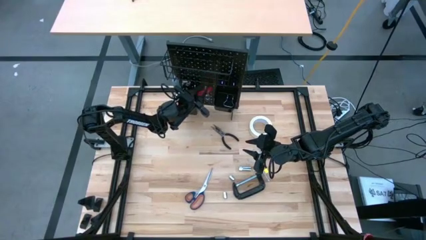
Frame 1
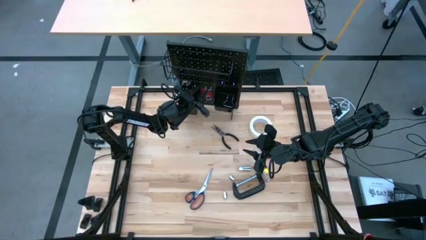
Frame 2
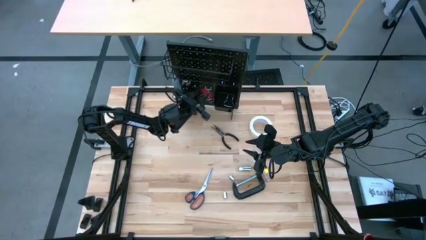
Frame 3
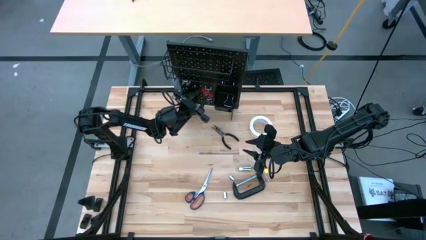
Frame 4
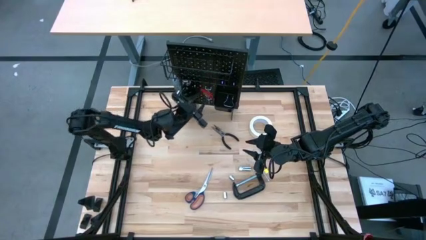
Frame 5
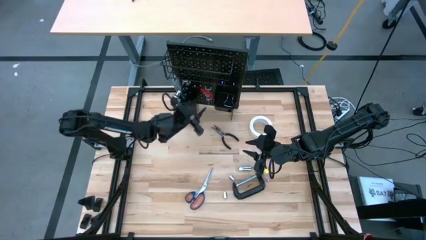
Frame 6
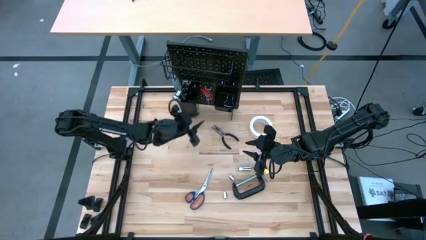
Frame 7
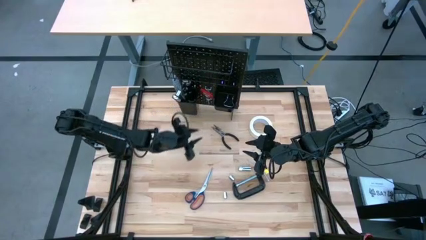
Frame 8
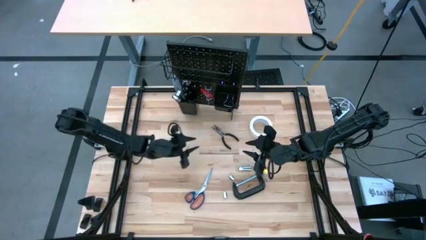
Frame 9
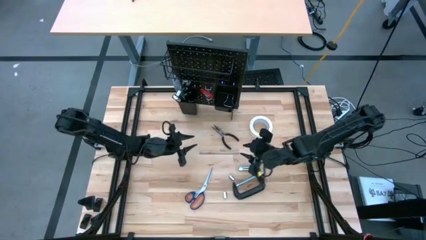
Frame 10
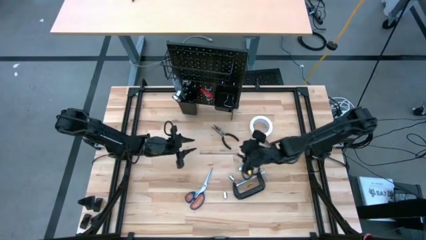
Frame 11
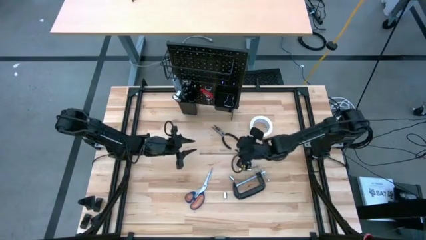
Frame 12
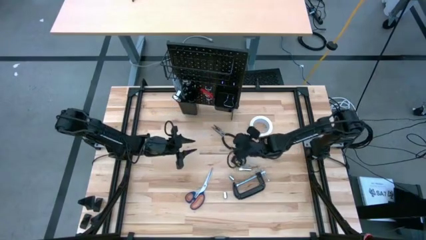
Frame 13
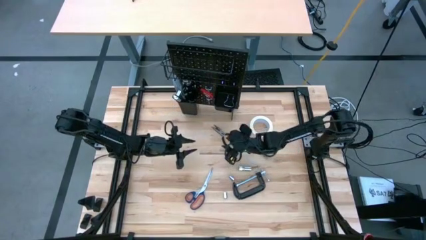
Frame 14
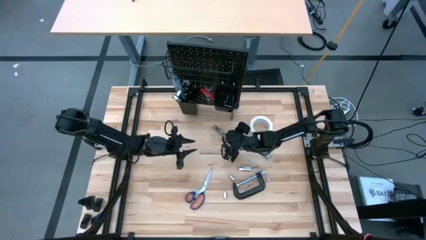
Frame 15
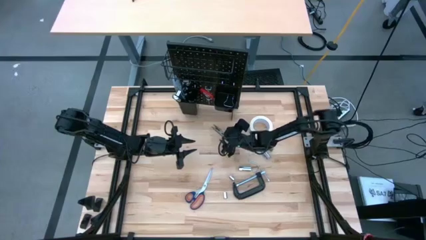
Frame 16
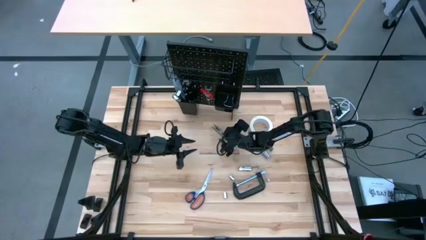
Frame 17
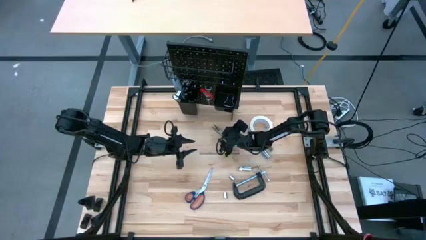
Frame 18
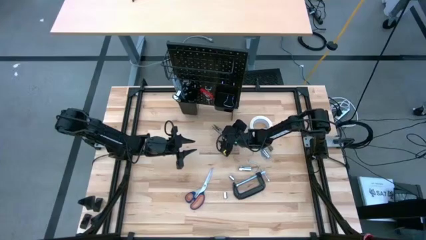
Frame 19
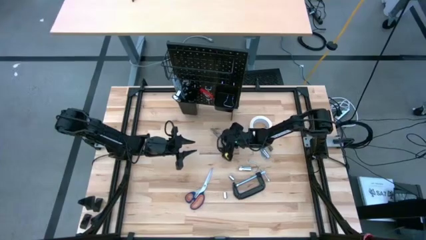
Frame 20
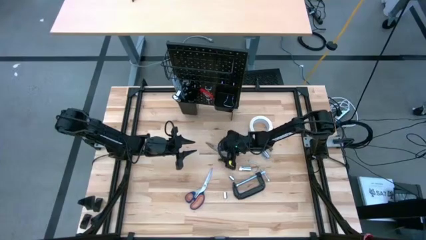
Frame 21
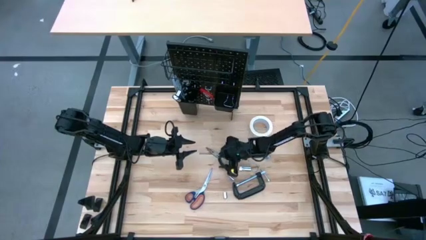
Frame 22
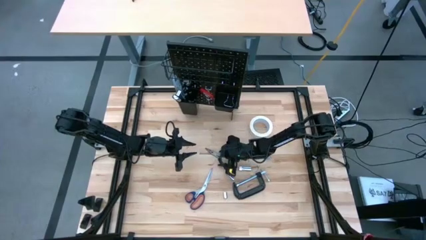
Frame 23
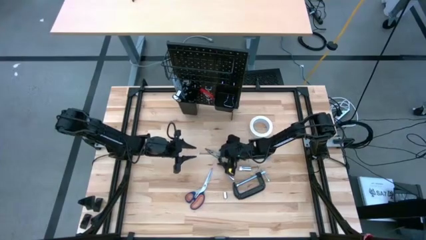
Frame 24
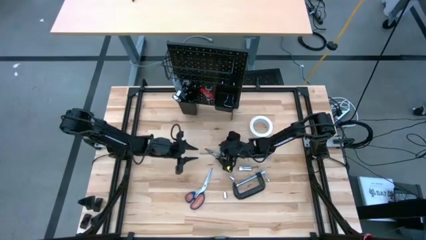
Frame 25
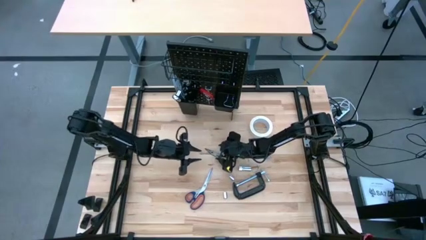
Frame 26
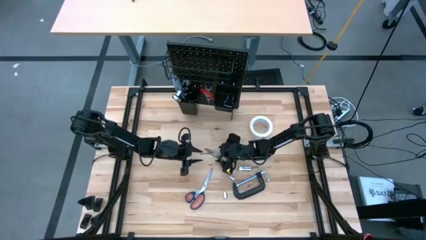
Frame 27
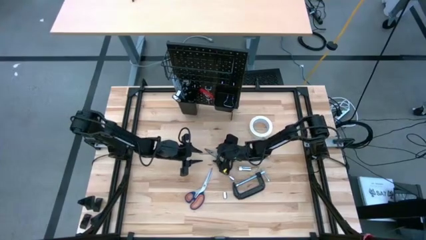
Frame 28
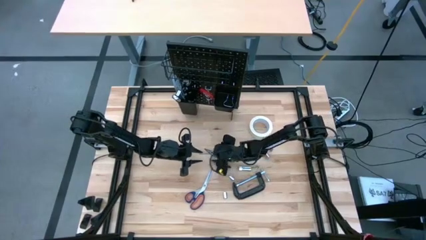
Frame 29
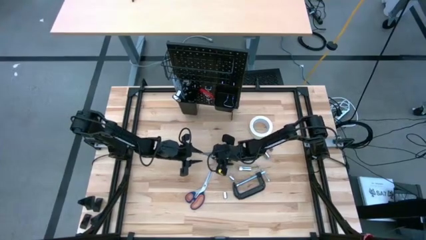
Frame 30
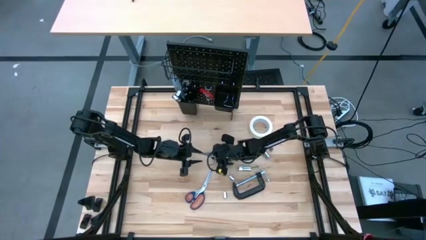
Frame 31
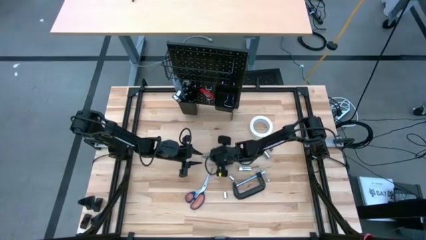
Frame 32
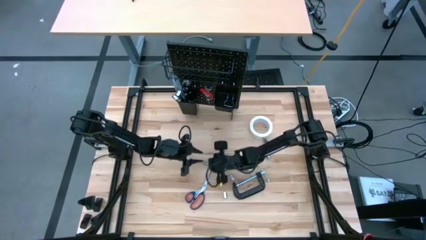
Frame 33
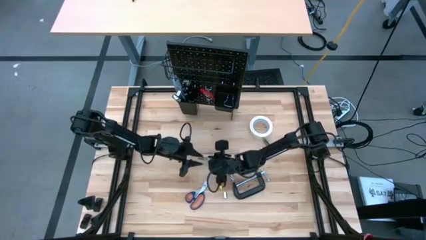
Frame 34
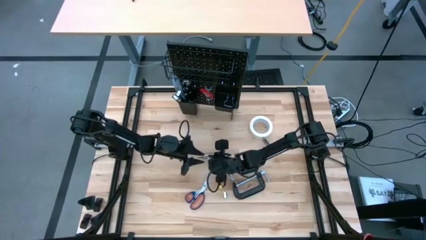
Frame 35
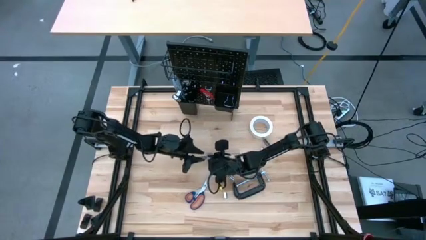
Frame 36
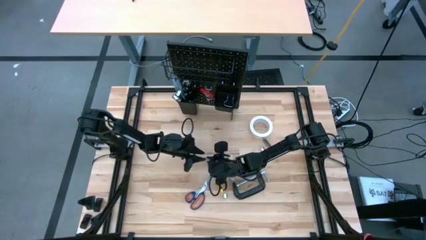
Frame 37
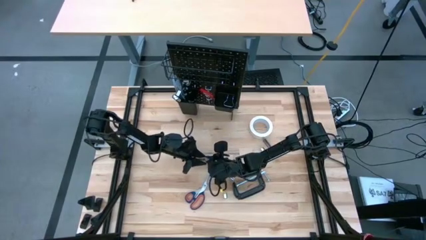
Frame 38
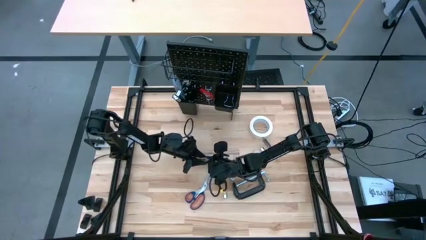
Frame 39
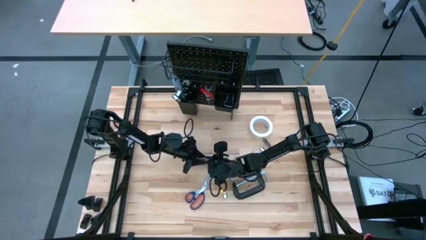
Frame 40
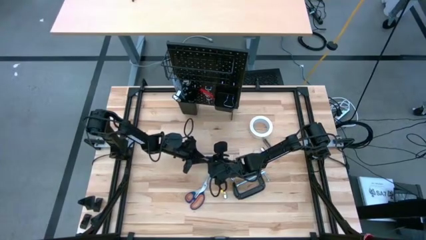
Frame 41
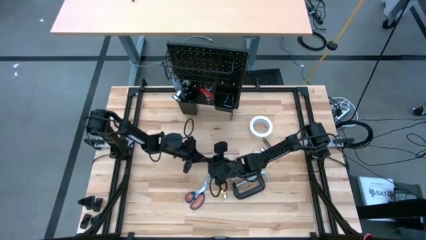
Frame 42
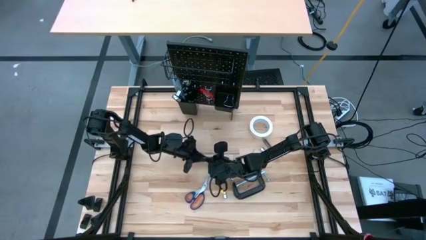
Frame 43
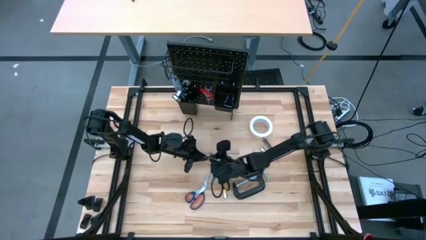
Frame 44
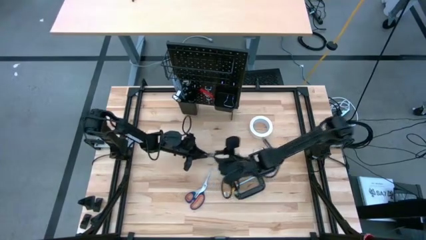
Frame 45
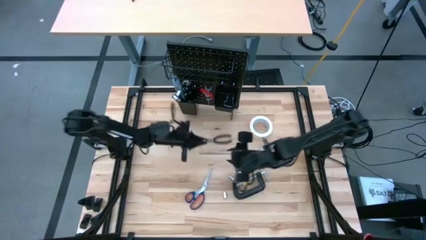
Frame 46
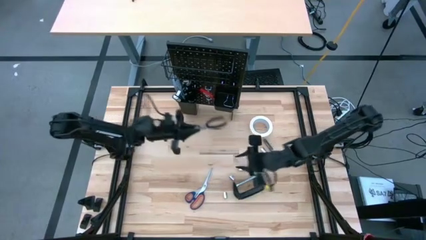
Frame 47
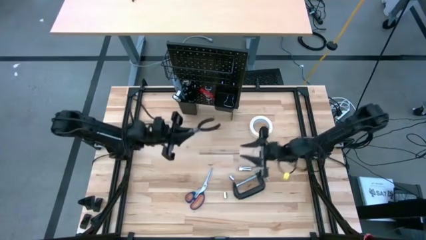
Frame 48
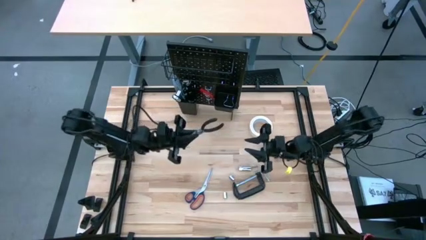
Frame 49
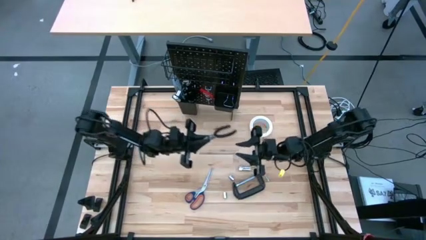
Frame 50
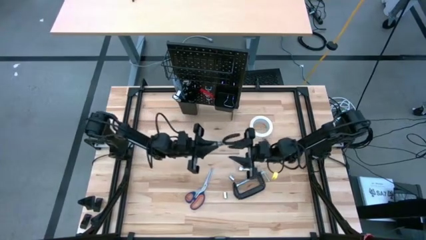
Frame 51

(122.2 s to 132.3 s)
Task: Hang tools onto peg board
Put the black long nose pliers into the left black bin on the peg board
